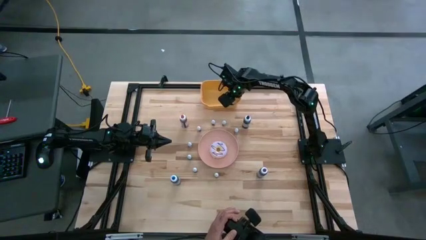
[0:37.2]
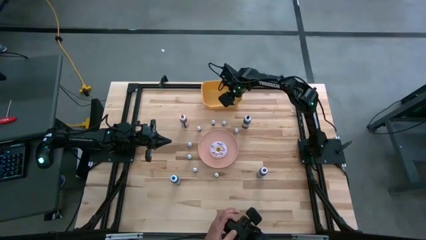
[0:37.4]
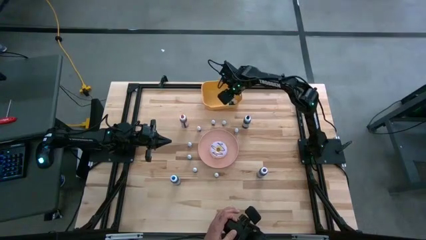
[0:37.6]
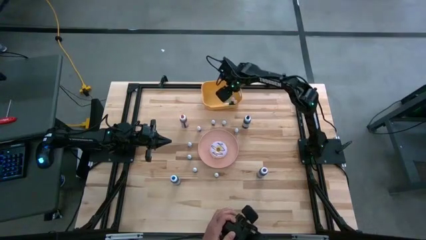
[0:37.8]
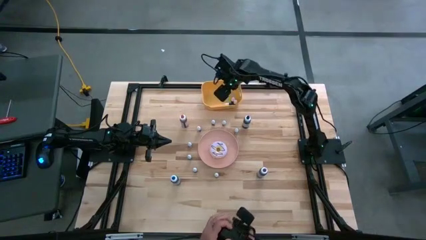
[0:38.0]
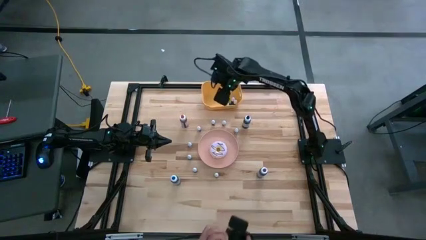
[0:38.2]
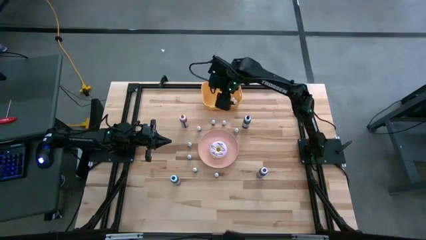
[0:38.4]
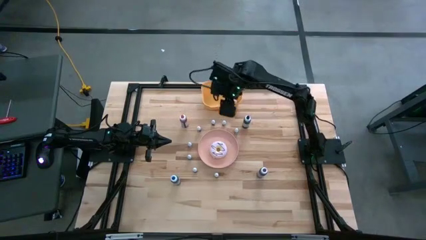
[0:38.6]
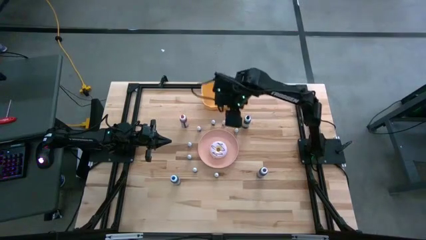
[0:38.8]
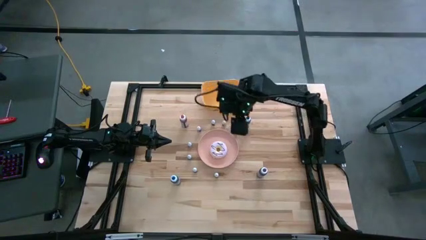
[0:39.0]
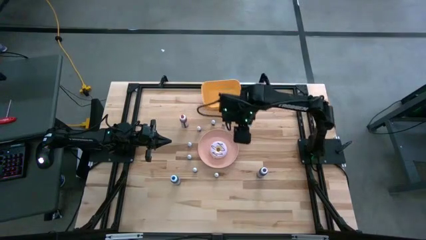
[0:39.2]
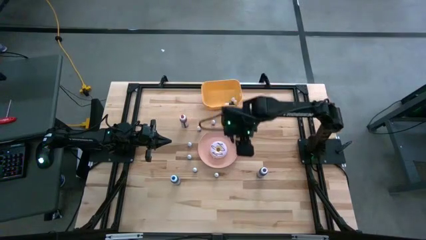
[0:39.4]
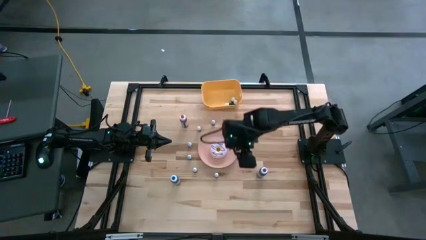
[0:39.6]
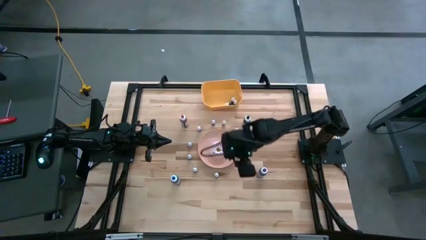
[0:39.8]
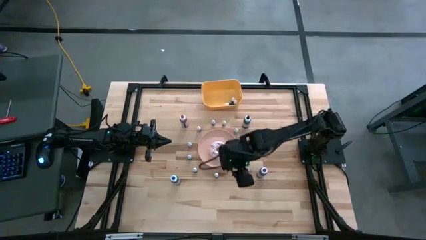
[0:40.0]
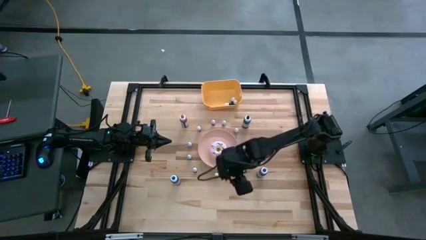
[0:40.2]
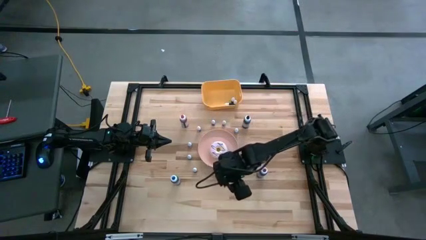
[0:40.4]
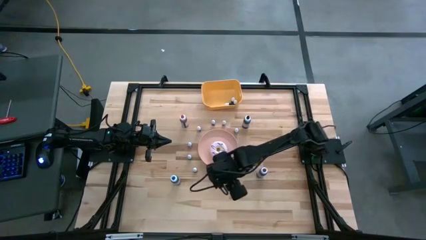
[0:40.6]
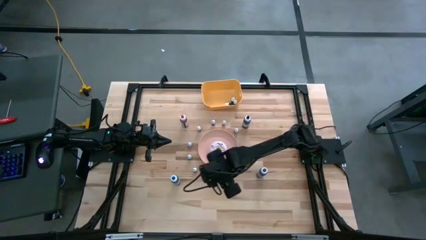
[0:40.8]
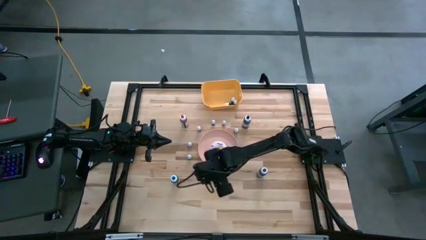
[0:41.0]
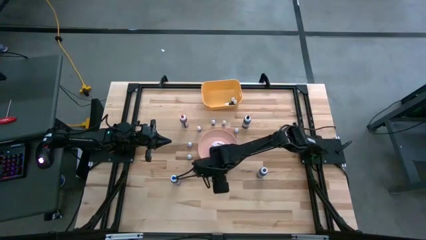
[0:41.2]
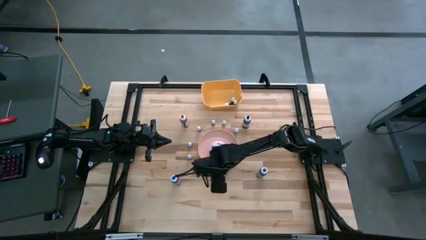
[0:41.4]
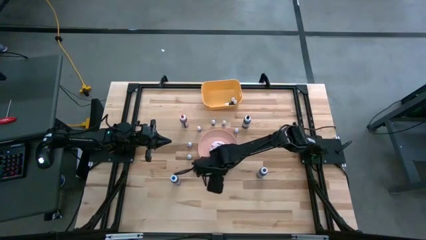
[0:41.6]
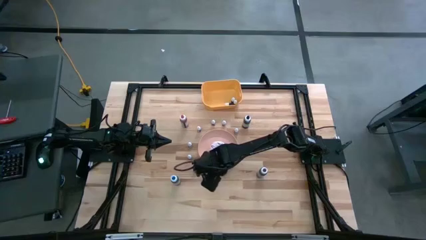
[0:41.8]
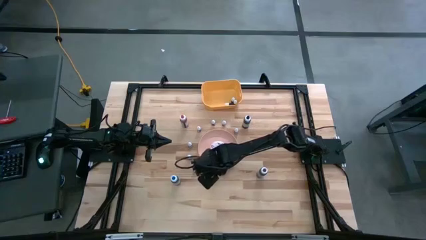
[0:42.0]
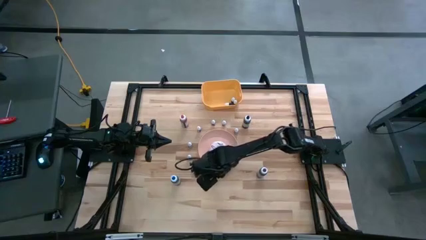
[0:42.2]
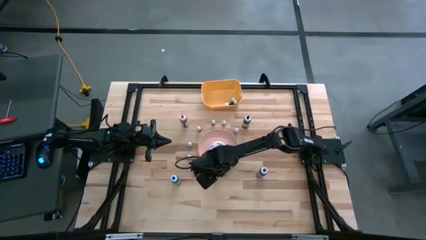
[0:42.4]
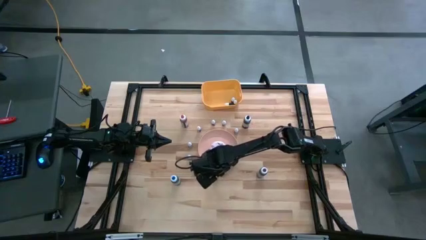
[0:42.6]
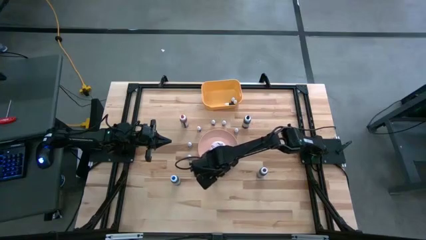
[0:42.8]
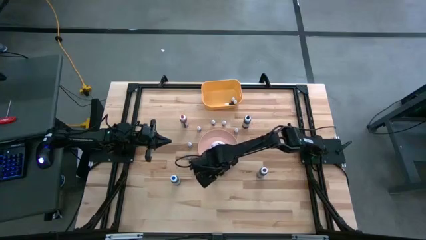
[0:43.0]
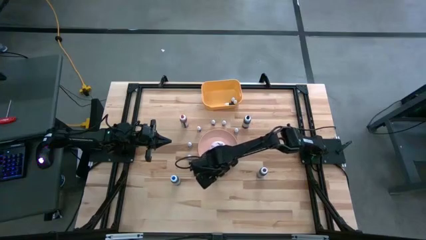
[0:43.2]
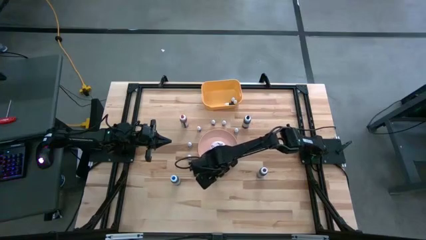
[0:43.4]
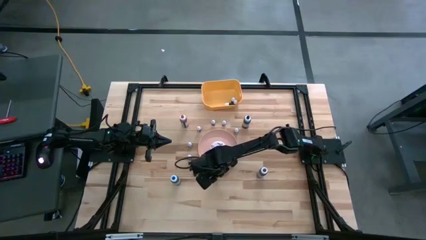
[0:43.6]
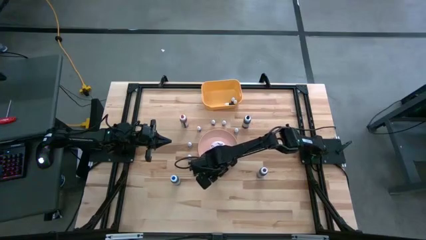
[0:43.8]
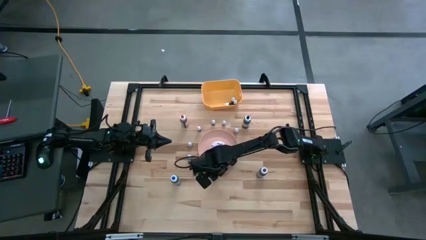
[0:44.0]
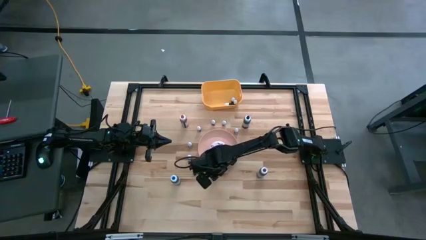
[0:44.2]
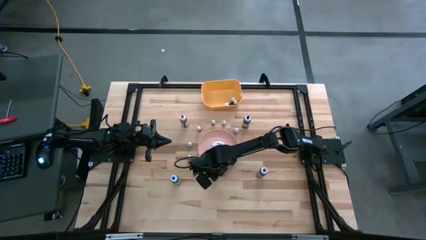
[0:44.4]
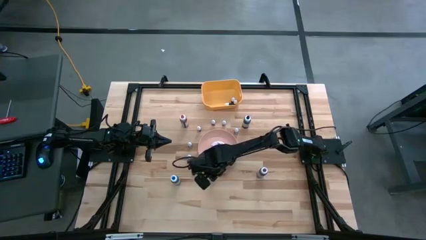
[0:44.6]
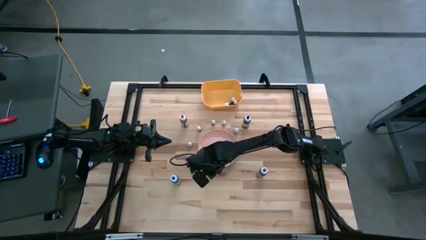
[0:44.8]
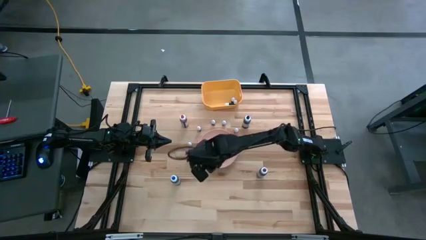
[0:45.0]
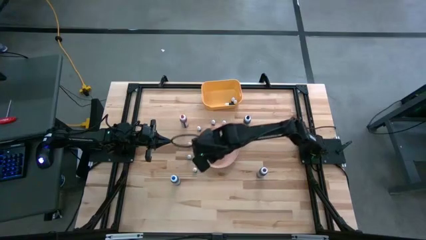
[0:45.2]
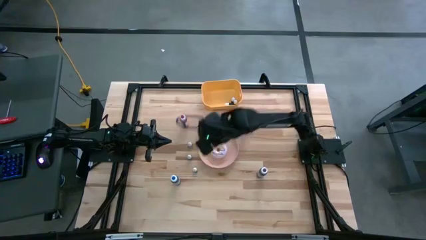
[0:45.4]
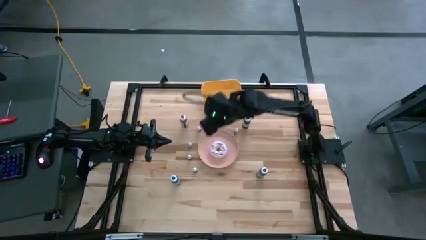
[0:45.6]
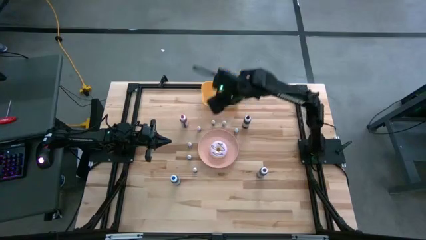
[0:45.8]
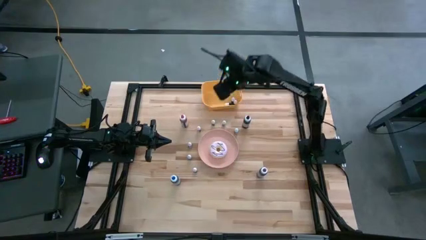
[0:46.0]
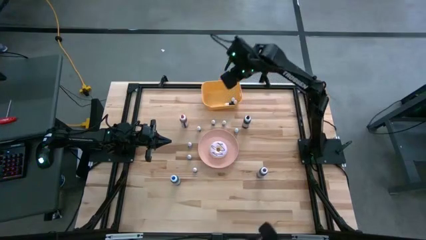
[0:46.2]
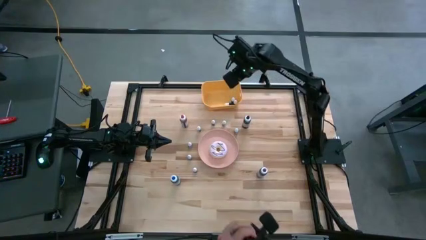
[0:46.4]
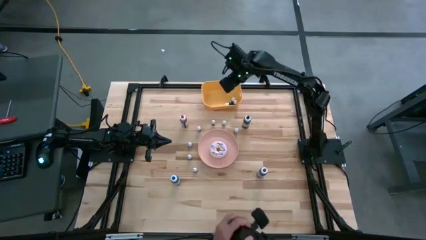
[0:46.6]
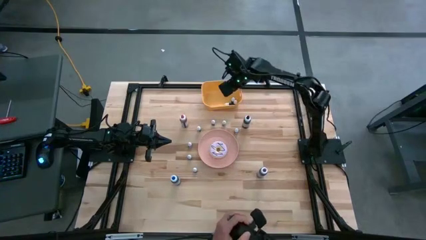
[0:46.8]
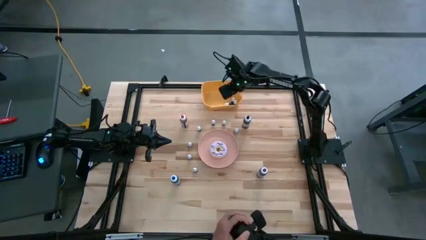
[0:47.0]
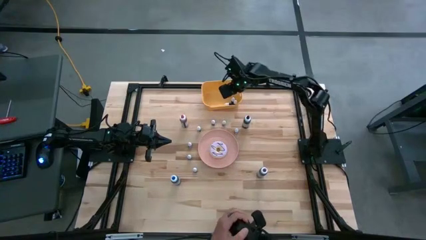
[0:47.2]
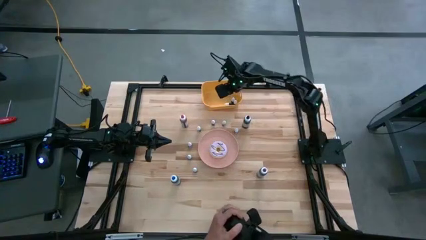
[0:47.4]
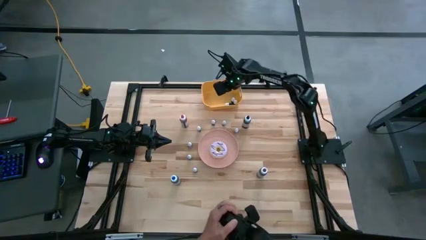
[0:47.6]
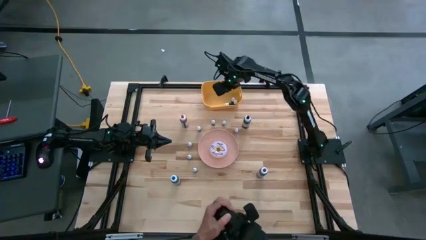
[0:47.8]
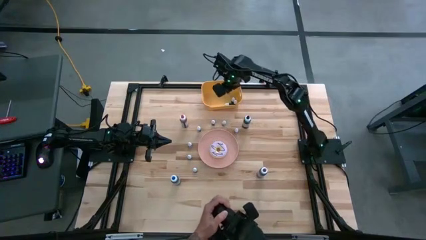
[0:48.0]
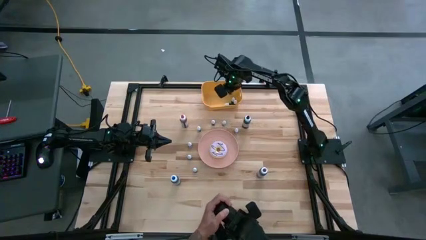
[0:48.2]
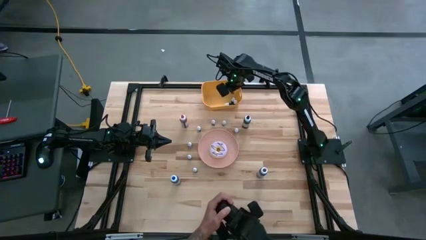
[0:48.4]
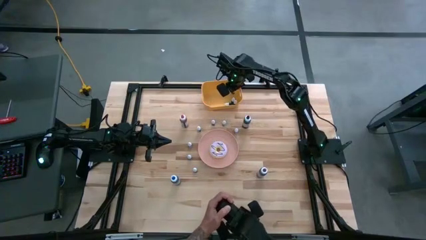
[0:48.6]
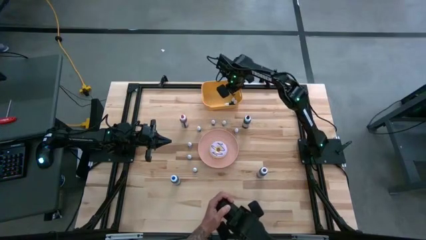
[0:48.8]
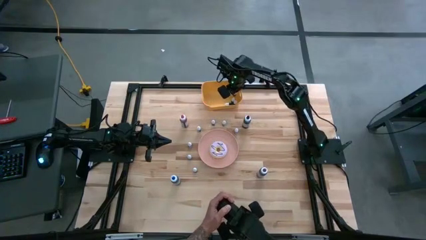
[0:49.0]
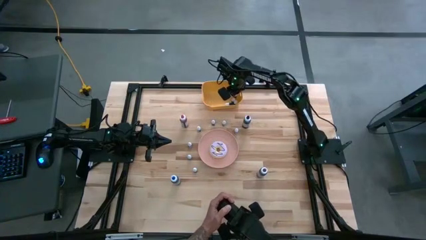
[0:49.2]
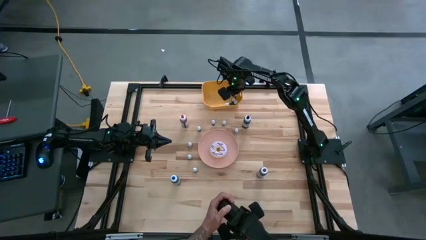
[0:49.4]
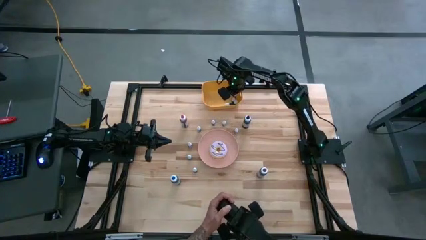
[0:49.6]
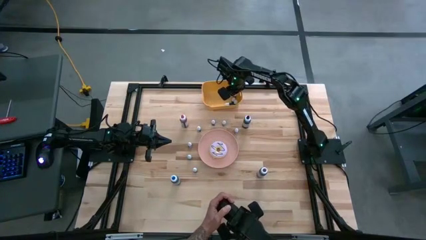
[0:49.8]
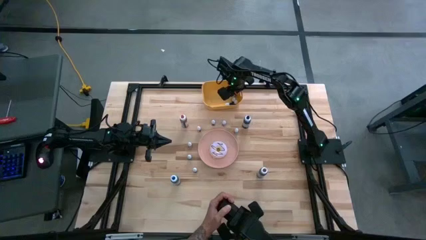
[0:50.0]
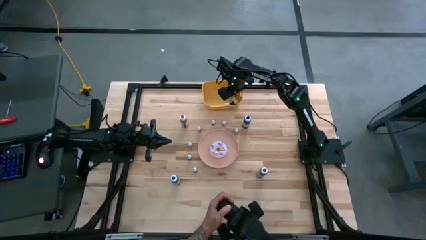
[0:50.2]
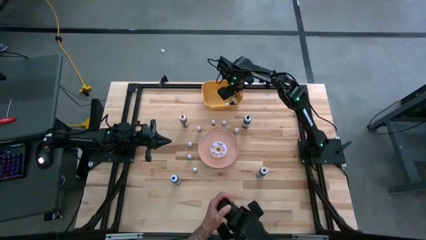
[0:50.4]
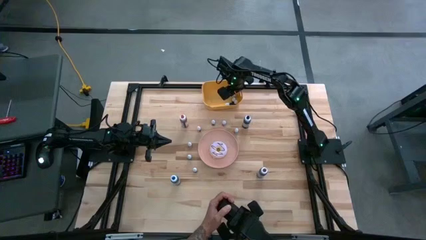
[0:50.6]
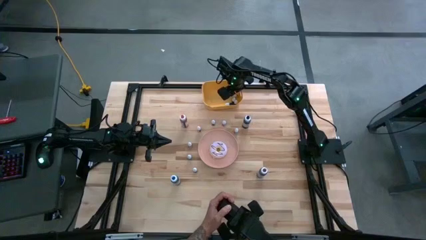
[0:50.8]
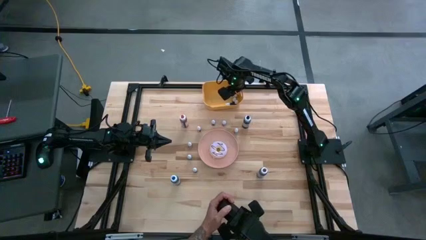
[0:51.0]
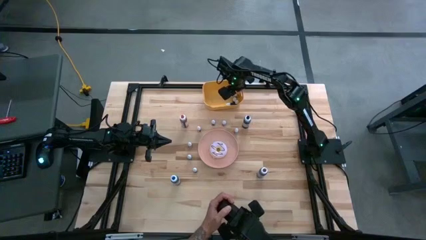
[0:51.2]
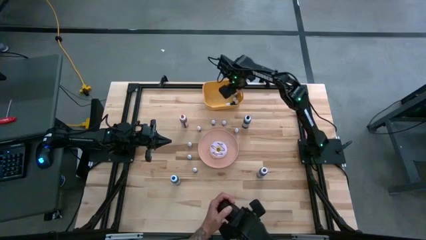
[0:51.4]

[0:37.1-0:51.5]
Task: Pick & Place food coloring
Put the small green food coloring bottle into the orange bin

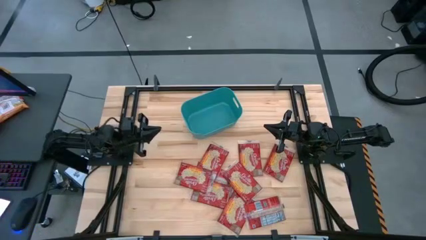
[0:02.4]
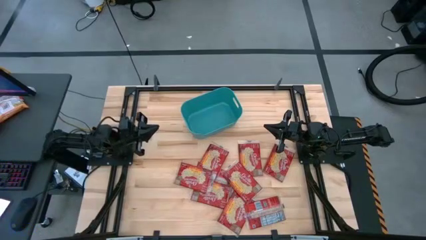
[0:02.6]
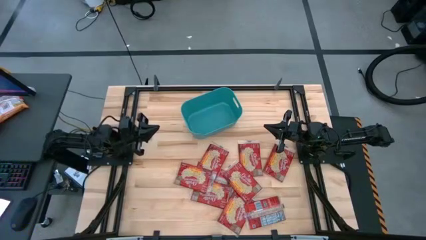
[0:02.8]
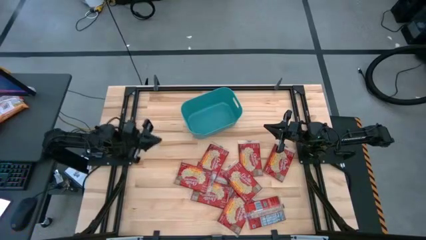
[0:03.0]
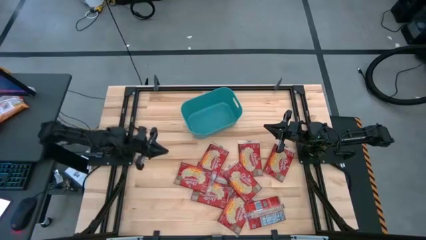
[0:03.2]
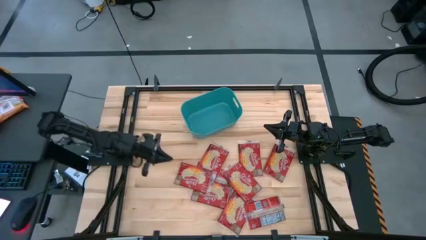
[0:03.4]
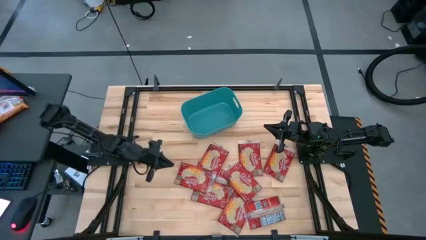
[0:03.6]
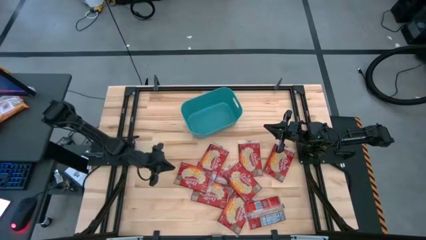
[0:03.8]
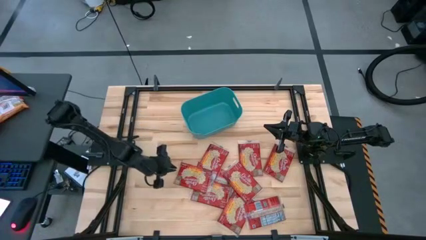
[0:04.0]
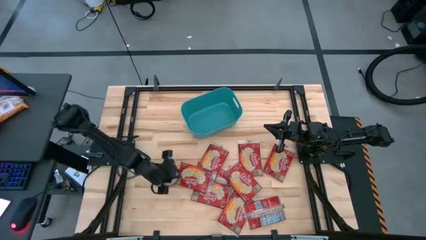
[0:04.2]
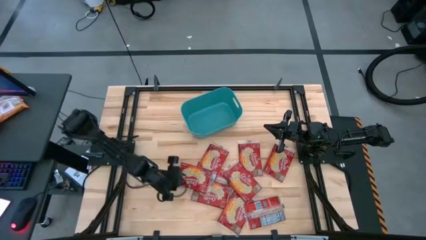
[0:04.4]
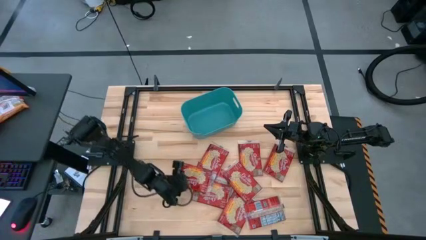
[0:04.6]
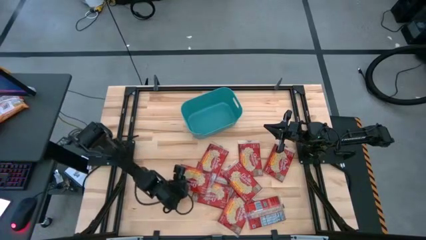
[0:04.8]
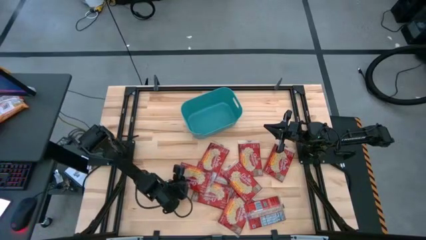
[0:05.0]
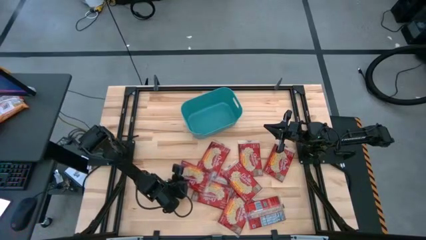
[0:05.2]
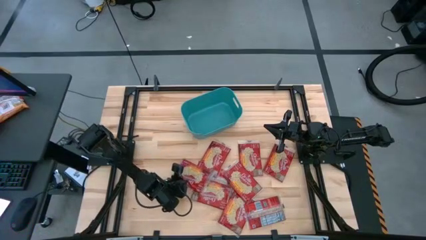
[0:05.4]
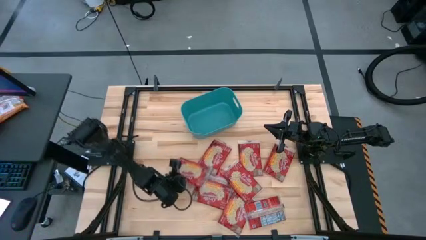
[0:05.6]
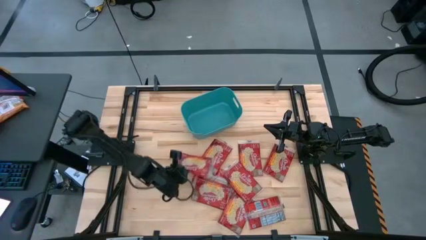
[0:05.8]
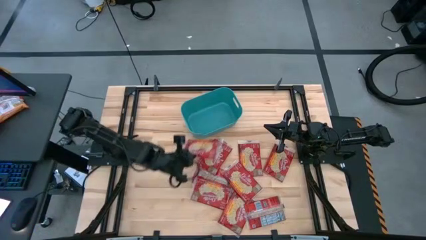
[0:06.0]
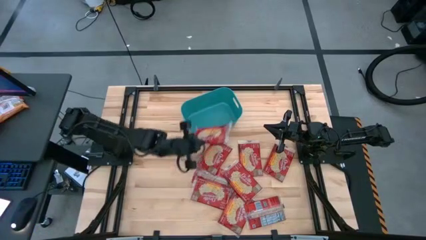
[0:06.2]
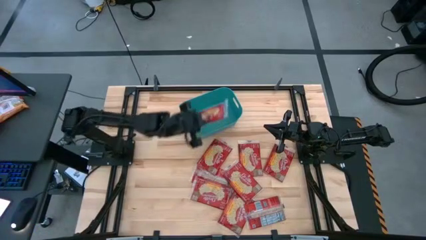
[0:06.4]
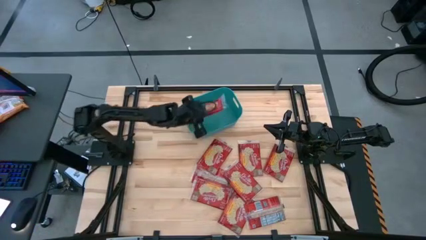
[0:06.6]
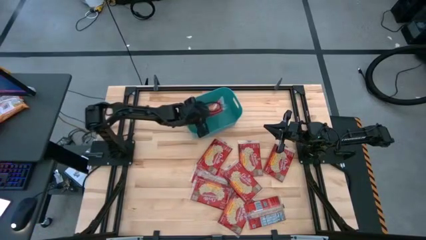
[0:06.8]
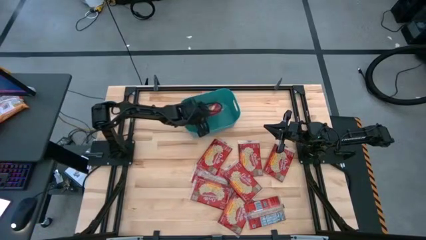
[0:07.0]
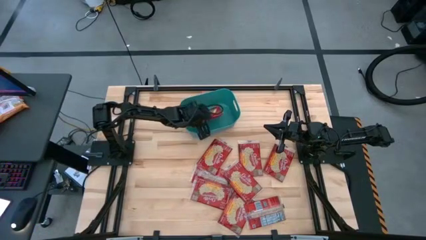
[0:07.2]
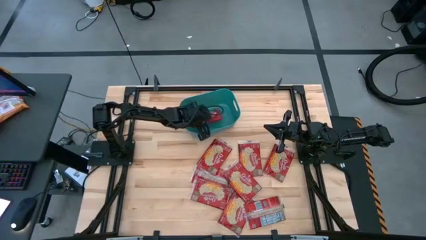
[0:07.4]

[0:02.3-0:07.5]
Task: Sort popcorn bags into baskets
Put the red popcorn bag into the green bin
